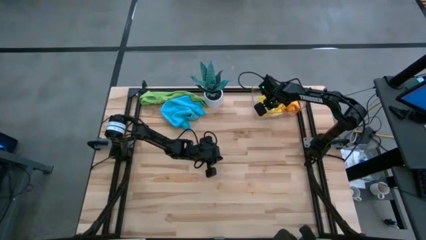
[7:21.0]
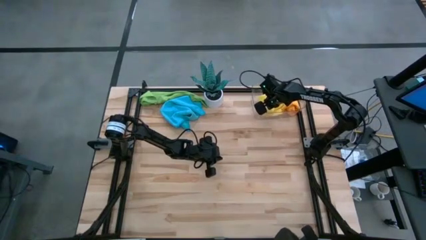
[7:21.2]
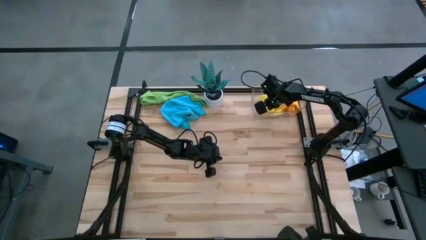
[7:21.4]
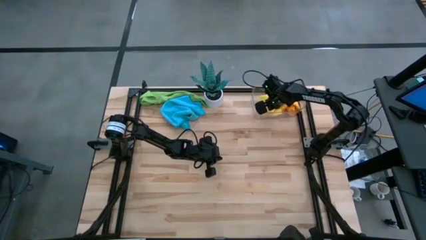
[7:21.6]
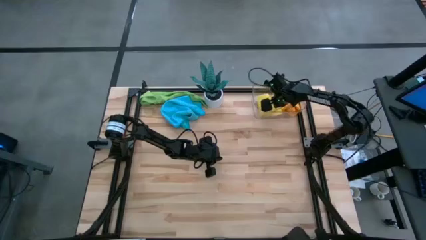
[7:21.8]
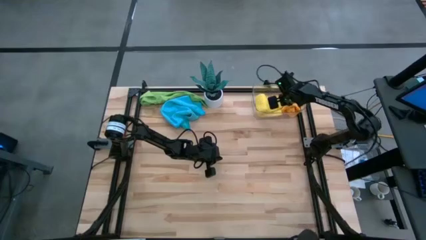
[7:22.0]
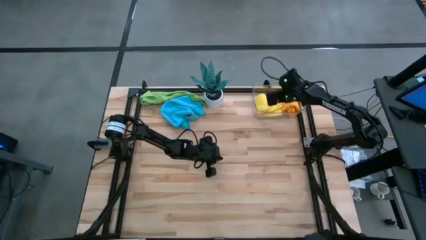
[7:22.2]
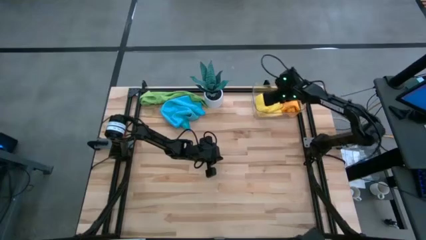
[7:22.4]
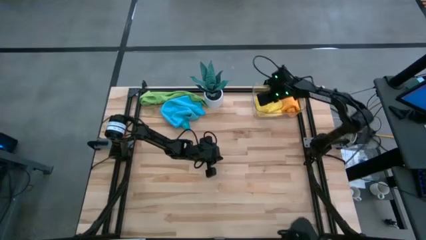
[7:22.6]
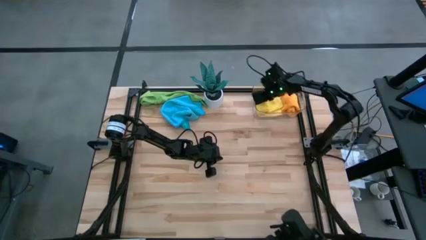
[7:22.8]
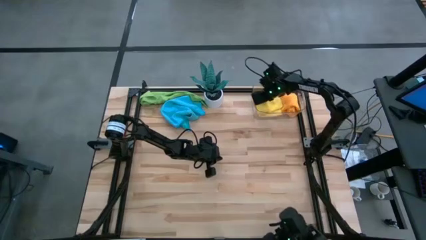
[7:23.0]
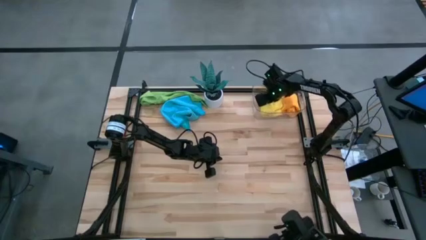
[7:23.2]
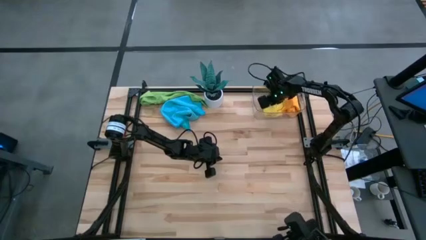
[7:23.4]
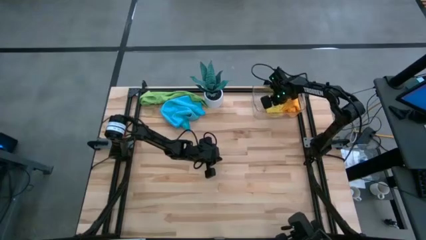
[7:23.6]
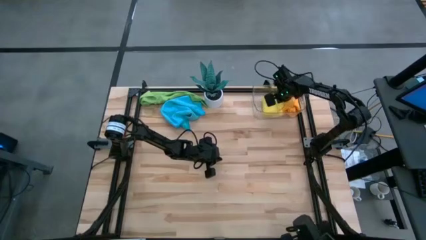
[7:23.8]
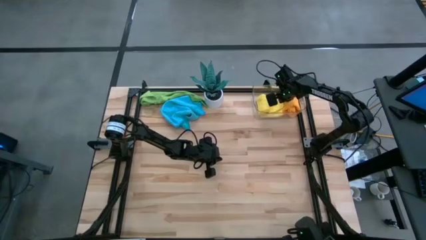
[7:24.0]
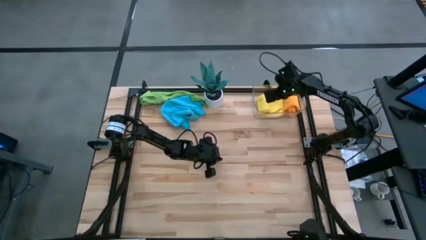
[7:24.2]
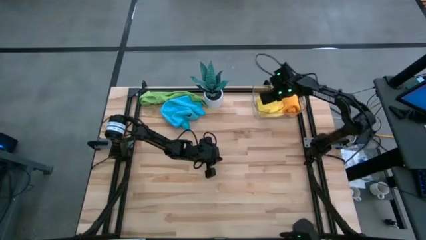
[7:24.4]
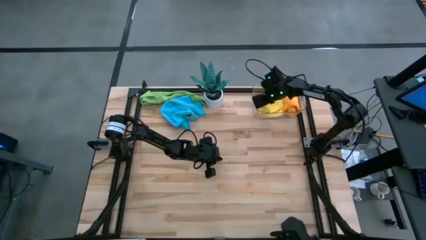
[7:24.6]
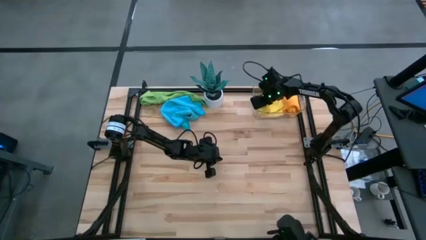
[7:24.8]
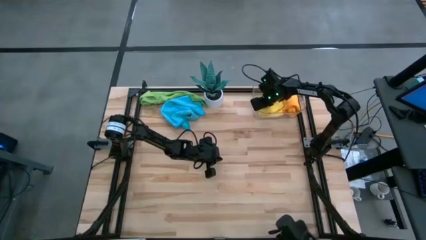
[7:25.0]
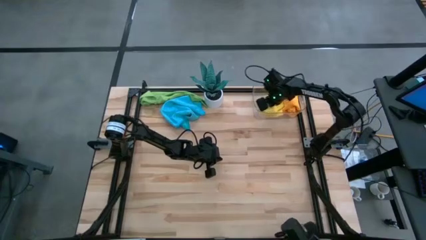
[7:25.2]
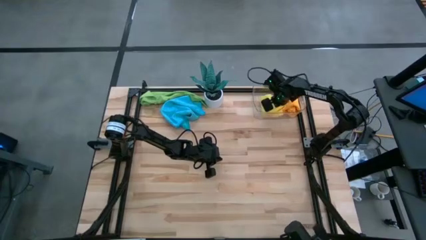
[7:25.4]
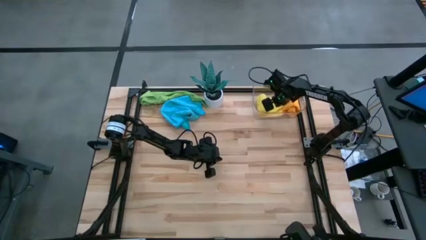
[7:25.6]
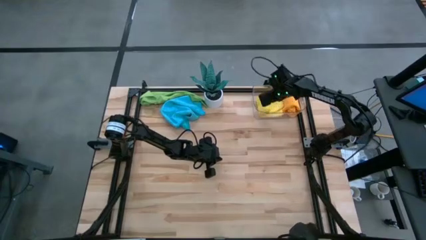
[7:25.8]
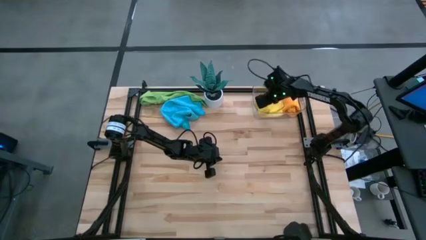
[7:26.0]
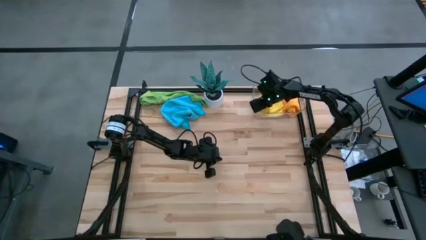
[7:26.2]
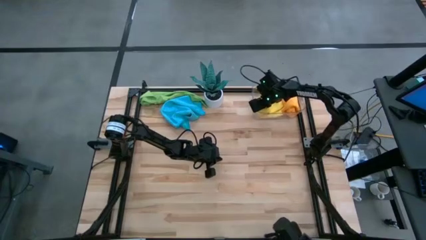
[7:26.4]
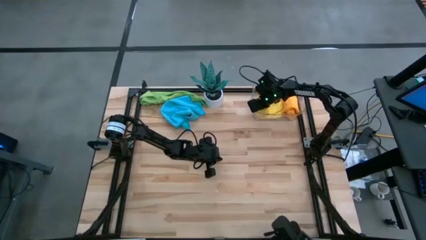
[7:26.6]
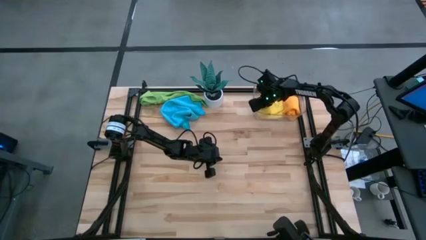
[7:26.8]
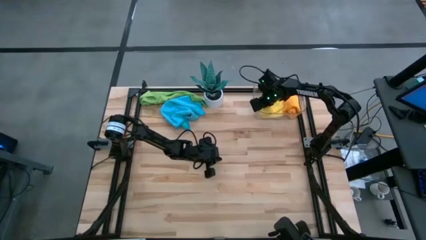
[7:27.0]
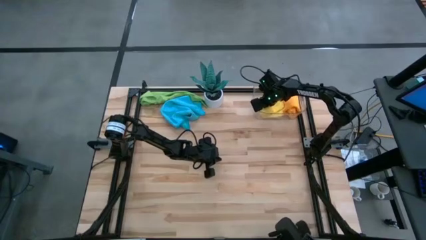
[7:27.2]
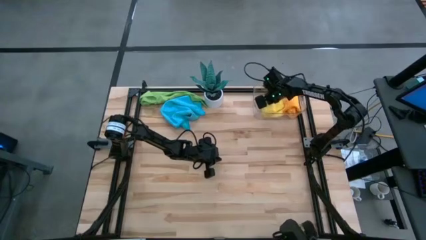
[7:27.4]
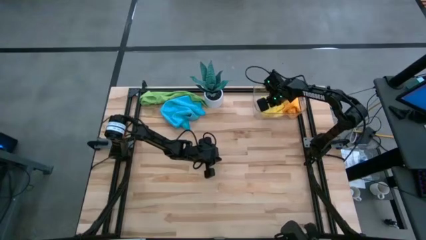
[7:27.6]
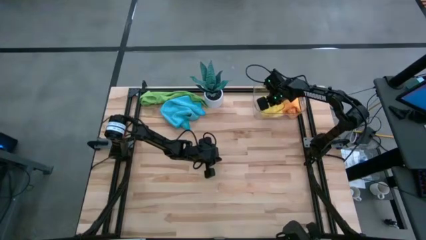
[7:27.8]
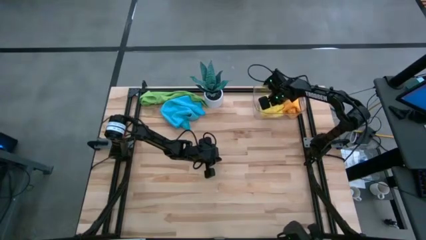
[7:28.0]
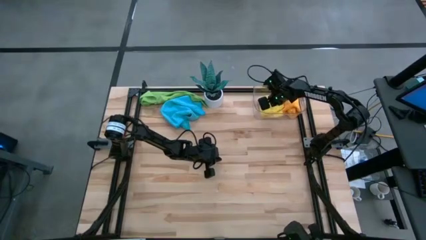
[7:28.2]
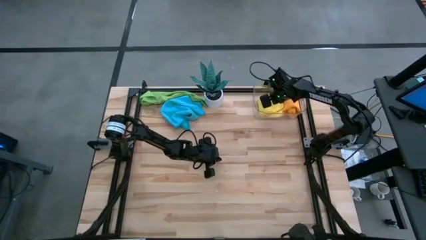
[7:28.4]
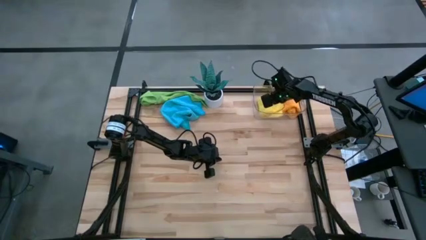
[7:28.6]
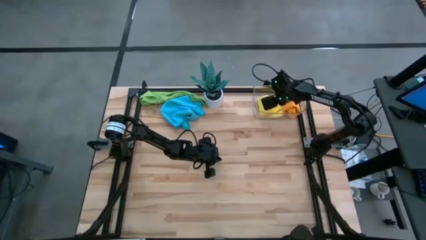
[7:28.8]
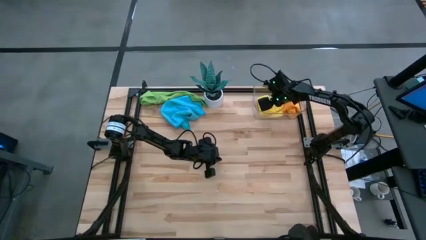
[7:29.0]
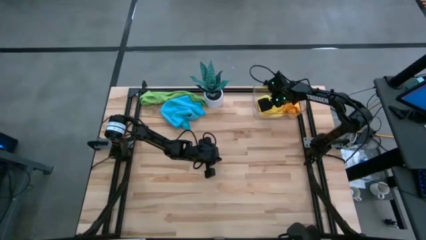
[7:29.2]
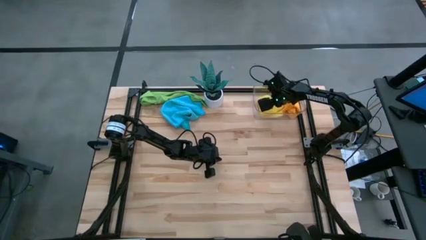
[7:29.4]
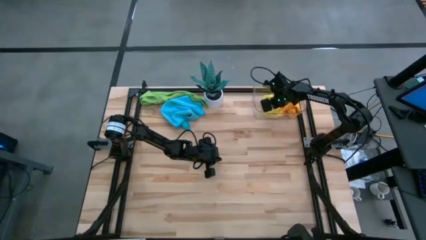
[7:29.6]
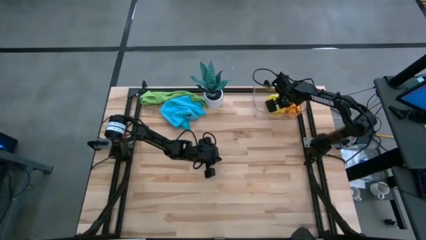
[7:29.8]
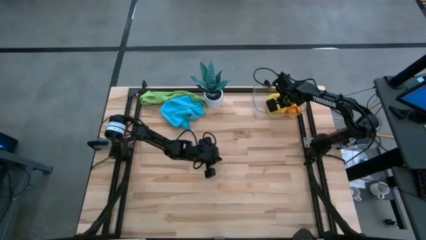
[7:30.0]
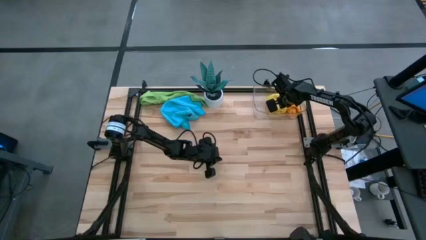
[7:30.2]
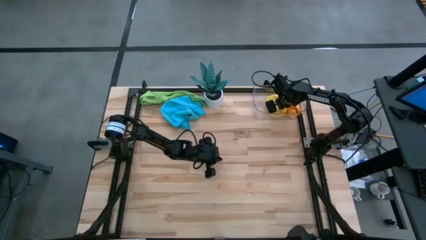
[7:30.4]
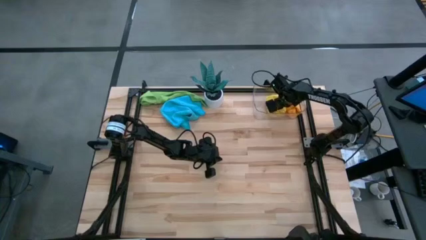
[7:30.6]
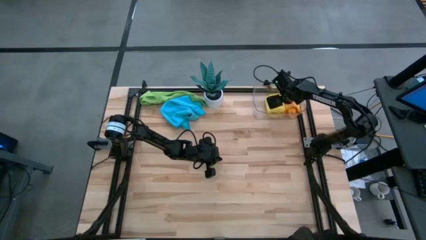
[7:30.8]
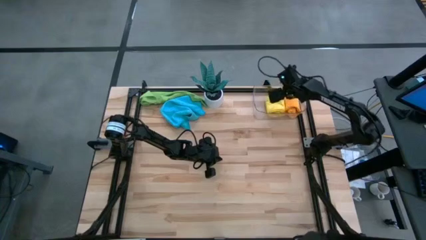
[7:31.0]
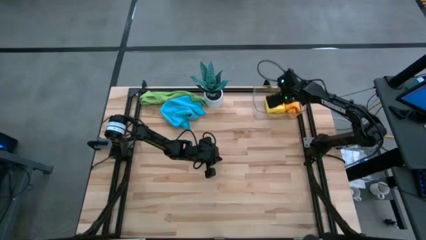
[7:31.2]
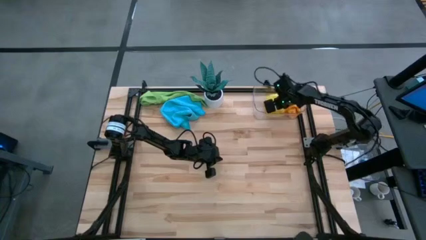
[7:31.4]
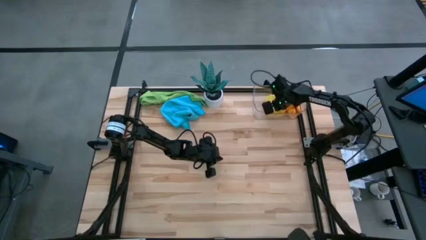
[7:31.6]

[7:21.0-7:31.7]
Task: Roll microfiber towels into tight, uniform cylinder then place into a basket
Put the yellow microfiber cloth into the transparent bin

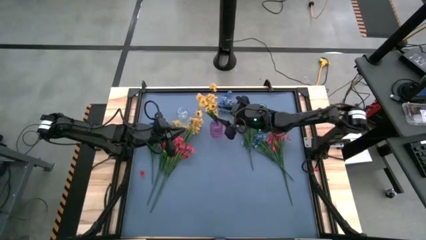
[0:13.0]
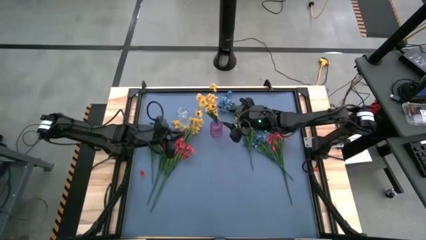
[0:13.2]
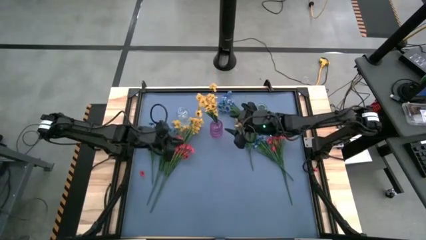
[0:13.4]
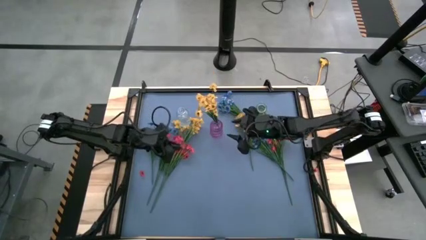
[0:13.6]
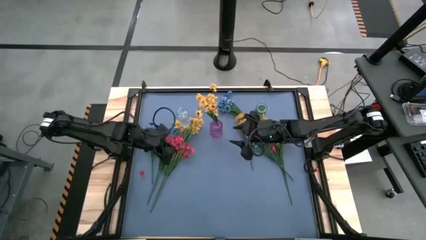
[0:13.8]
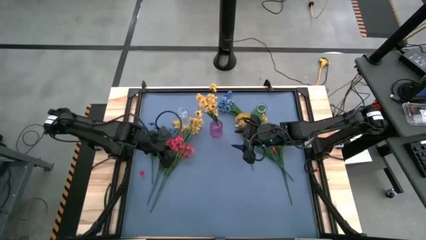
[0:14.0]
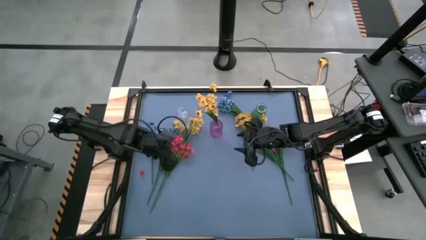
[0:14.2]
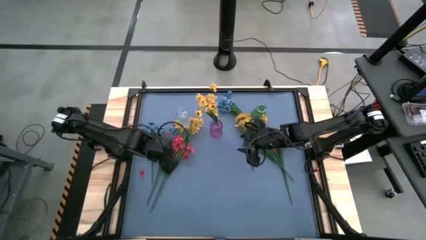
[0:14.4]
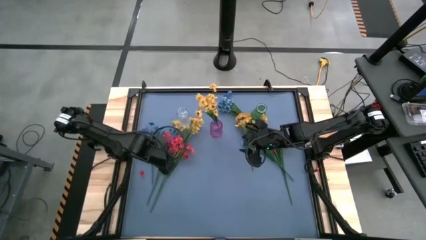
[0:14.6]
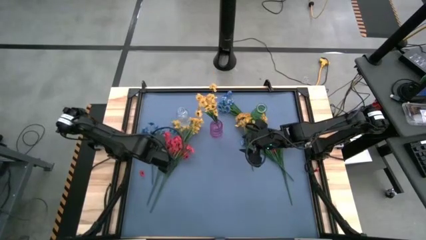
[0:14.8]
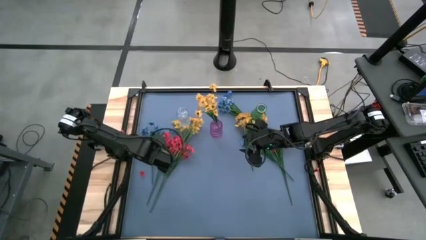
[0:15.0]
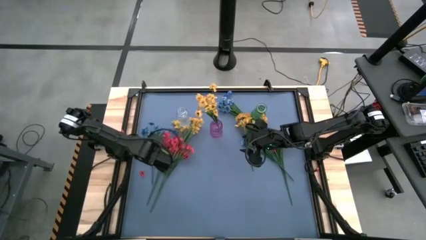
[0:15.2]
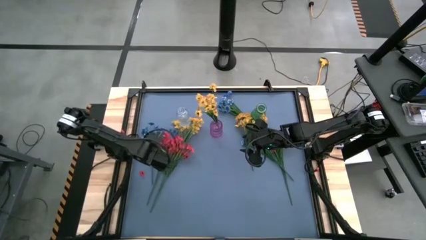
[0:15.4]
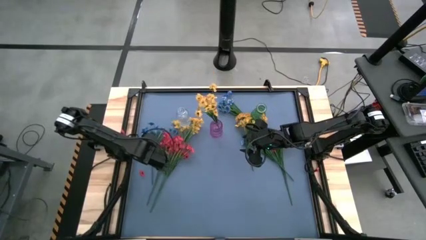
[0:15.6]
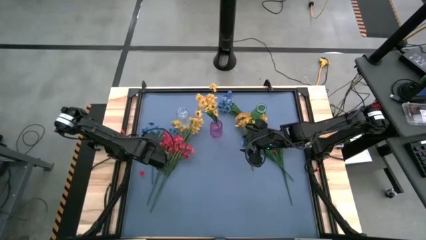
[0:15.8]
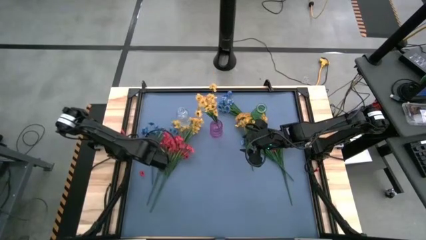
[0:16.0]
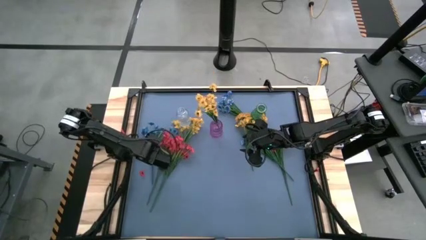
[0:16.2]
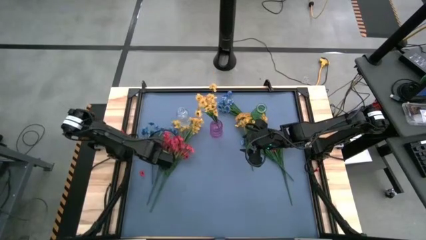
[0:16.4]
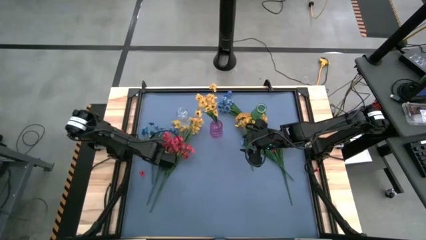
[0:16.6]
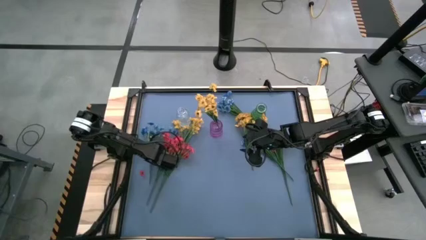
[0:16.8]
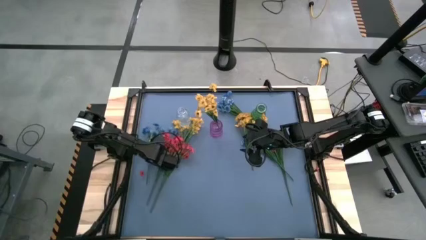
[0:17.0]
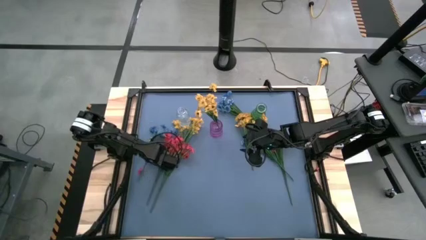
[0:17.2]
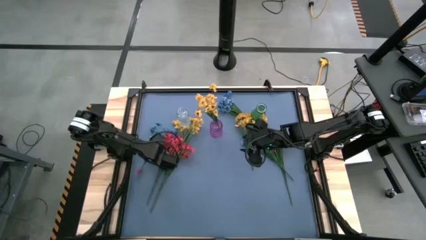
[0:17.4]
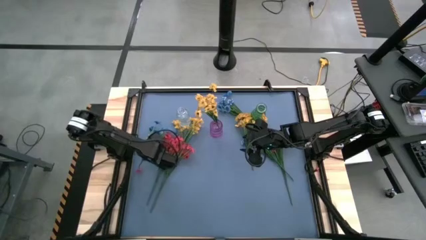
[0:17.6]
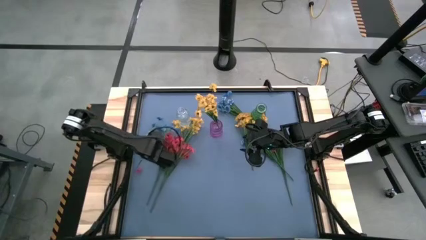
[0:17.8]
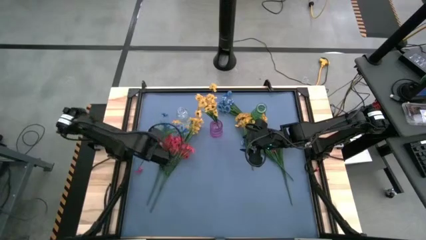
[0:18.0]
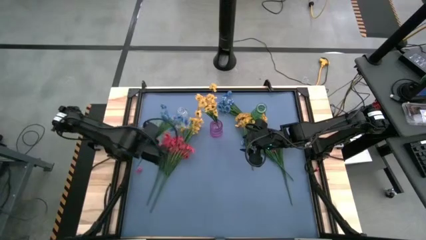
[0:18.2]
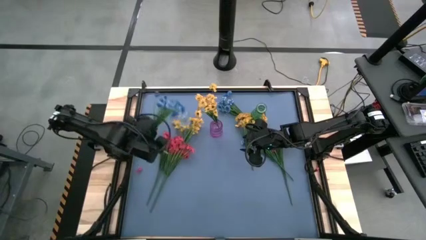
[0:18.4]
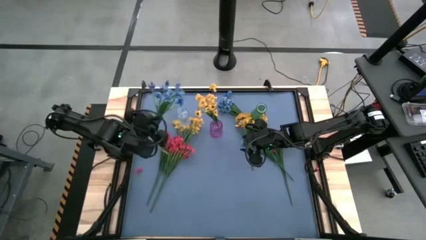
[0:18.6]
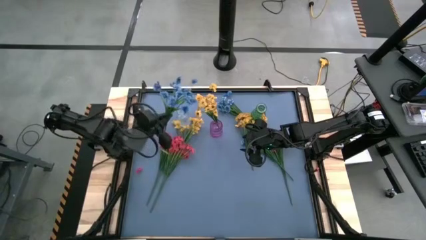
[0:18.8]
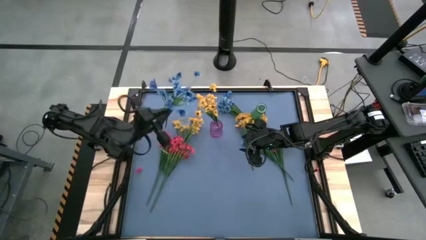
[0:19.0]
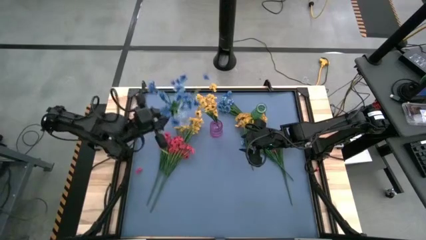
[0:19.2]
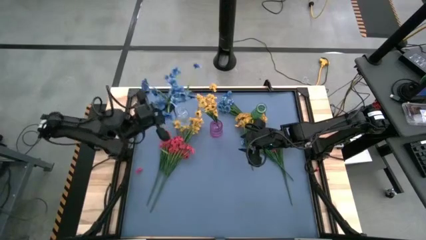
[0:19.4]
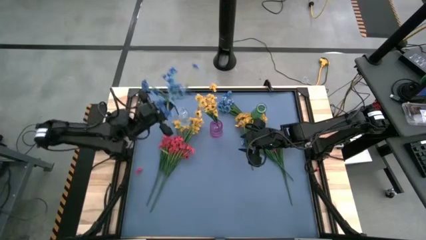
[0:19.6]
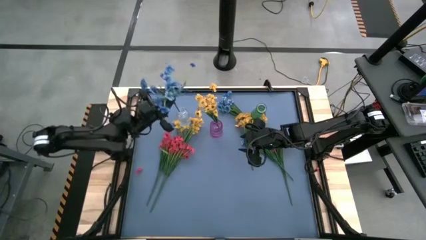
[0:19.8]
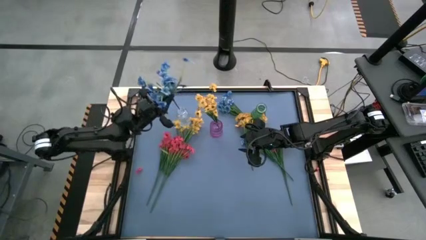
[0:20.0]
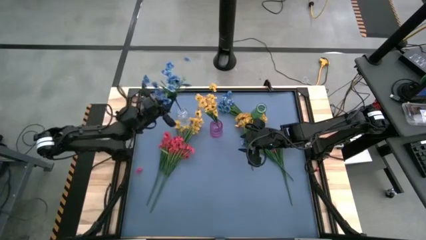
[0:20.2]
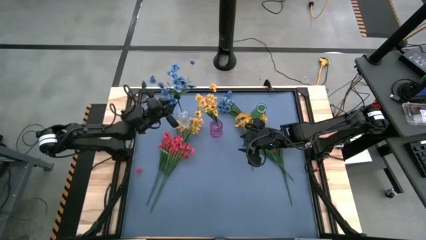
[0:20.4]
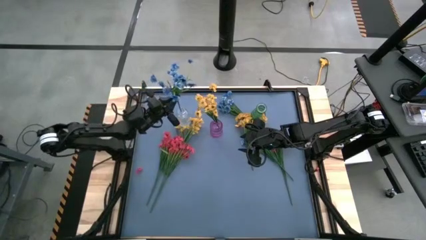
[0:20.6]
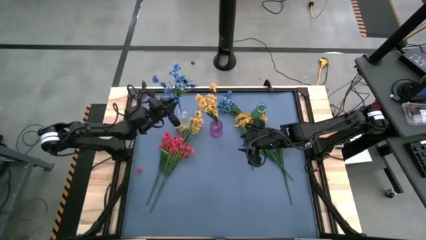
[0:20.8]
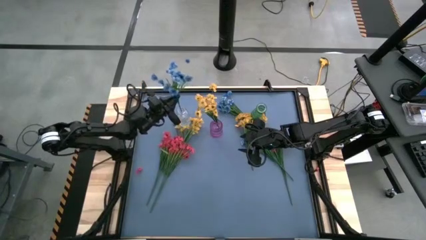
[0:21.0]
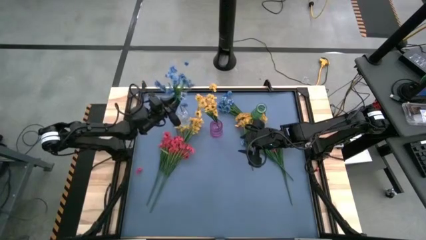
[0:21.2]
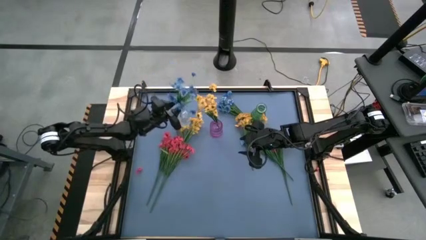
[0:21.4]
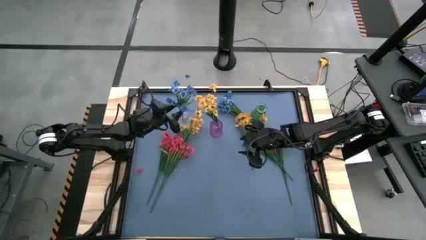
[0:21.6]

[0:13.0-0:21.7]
Task: Sort flowers into vase by color
Put the bottom left blue flowers into the transparent vase
